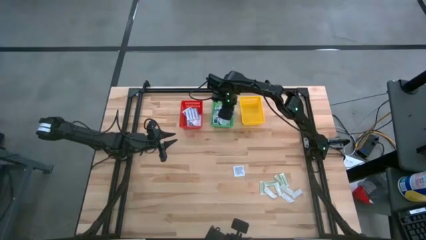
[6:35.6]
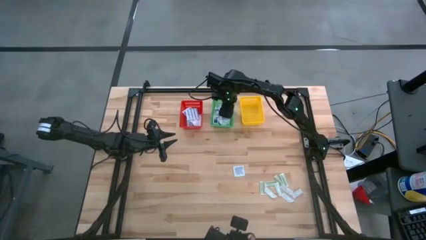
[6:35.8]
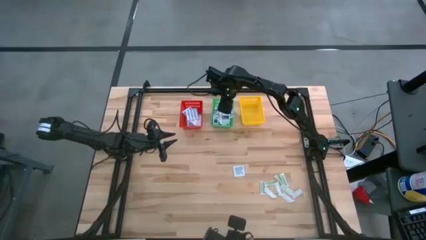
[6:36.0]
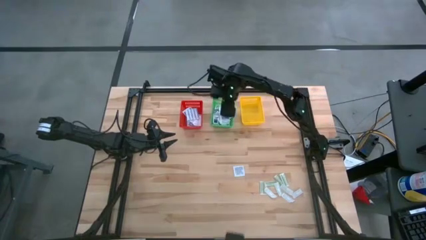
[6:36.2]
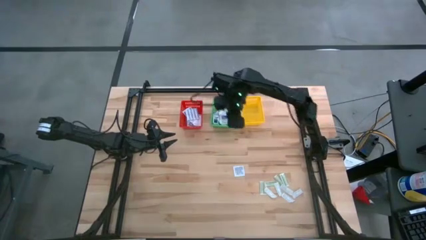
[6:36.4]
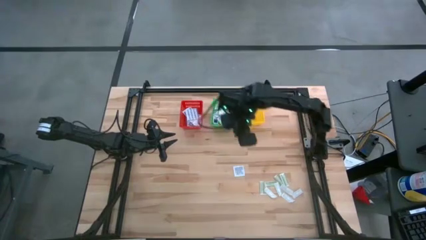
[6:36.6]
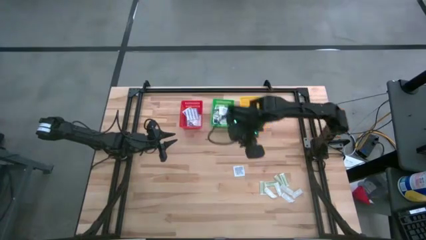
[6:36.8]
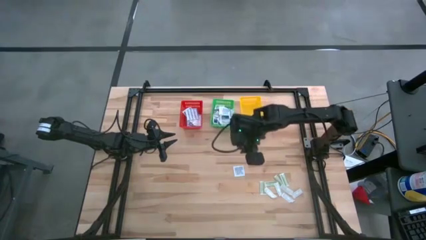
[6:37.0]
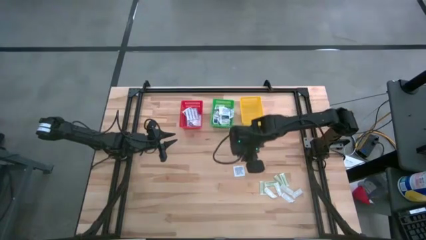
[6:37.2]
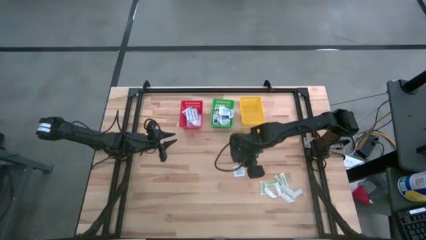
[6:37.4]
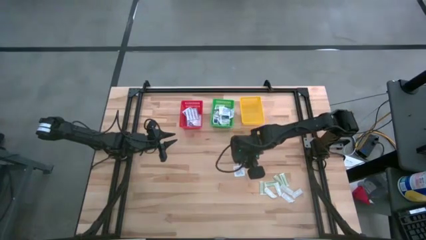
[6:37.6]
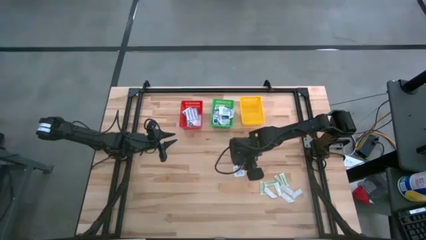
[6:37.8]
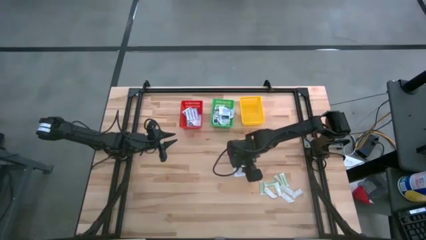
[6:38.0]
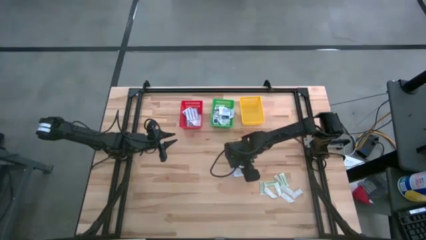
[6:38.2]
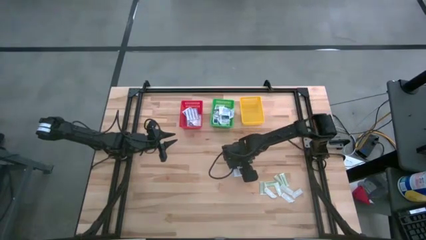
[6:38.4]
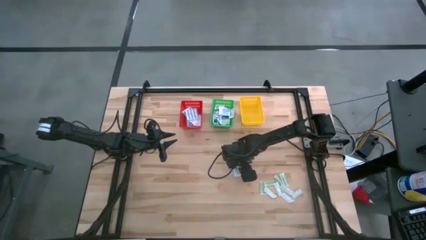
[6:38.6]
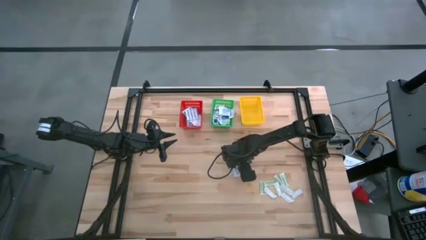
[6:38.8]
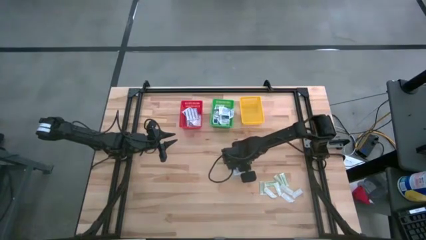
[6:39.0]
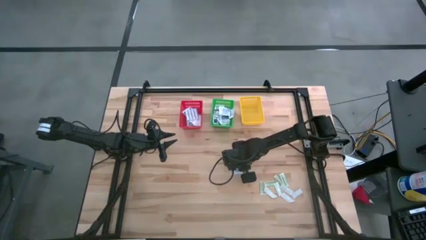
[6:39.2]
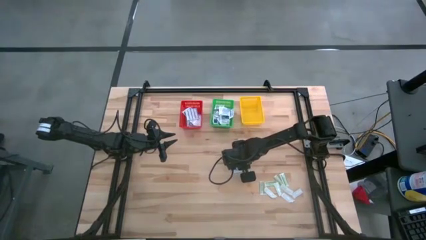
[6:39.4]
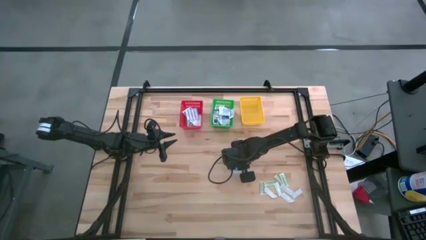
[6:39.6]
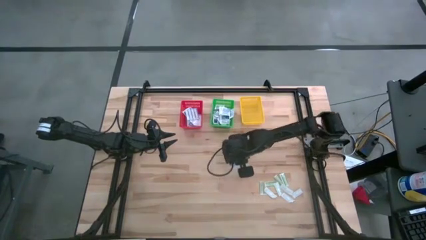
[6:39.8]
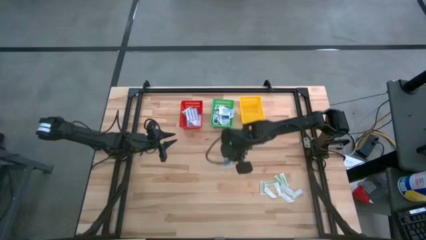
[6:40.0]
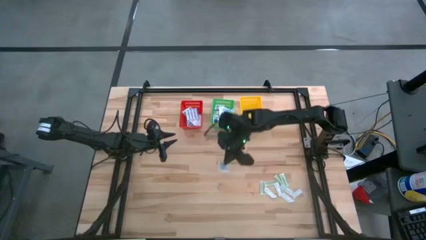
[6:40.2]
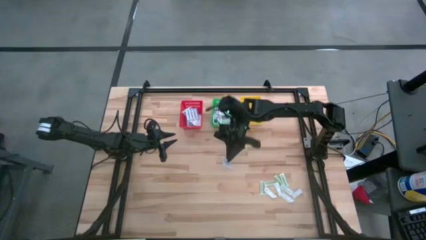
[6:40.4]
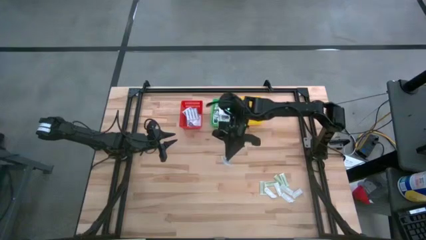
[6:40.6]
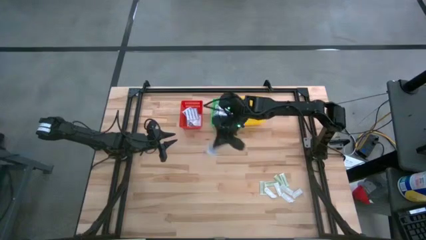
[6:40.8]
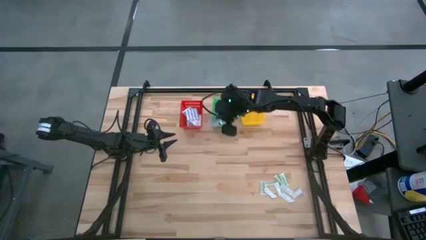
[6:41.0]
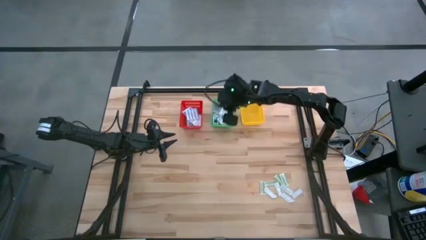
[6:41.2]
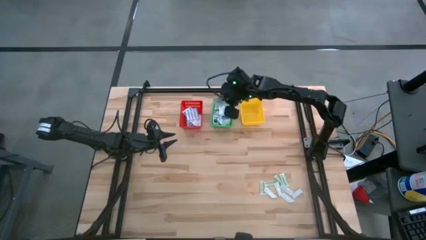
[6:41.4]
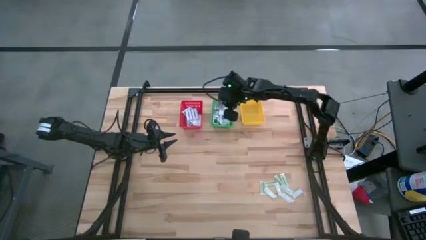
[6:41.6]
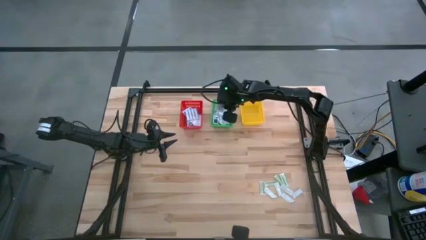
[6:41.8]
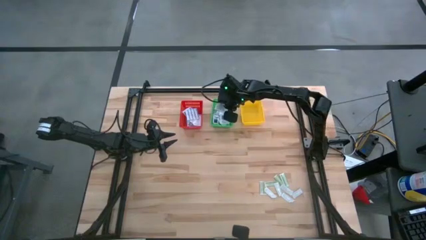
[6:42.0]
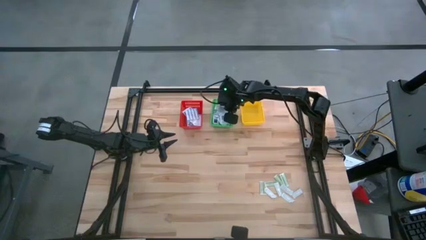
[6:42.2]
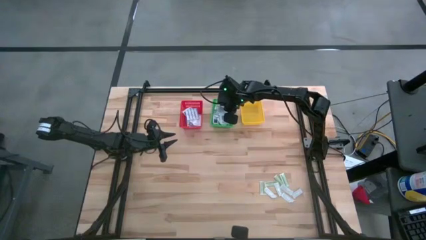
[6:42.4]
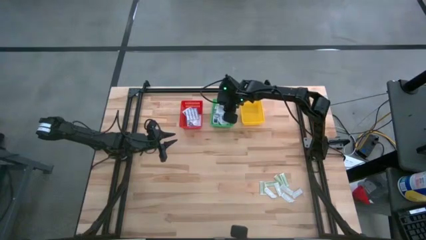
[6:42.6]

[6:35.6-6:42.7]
Task: Pick & Place First Aid Supplies
Put the alcohol pad into the green basket

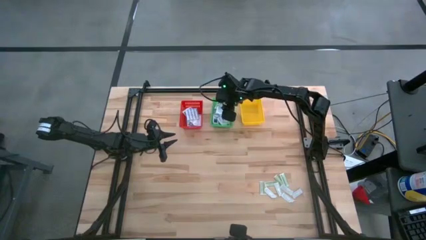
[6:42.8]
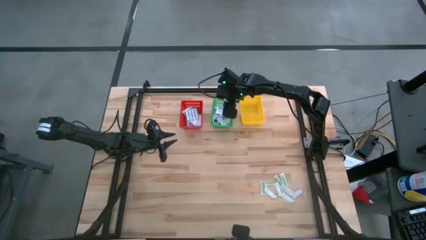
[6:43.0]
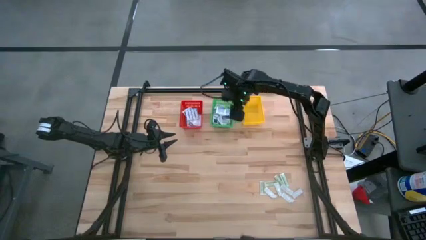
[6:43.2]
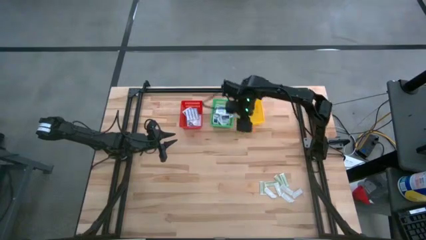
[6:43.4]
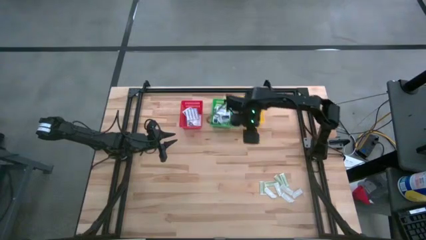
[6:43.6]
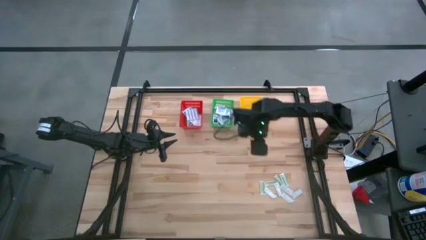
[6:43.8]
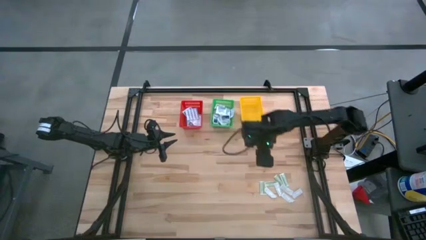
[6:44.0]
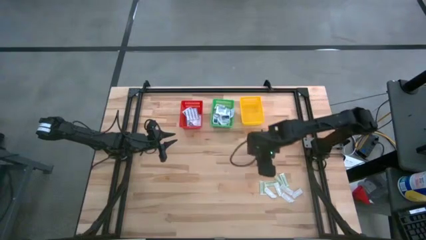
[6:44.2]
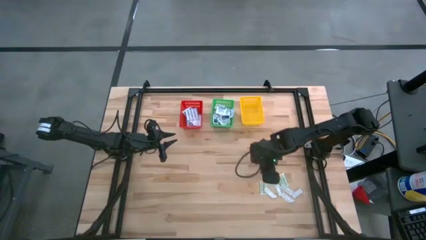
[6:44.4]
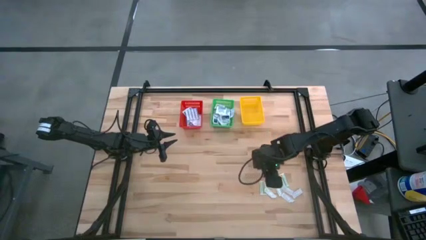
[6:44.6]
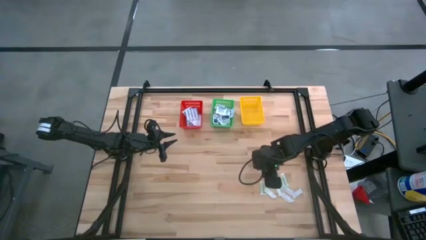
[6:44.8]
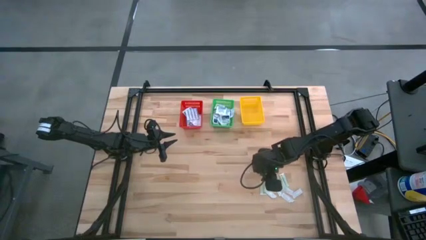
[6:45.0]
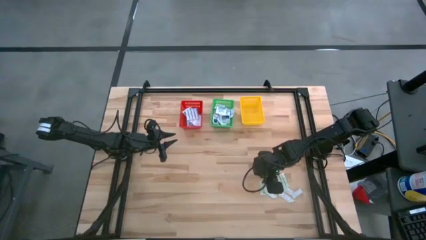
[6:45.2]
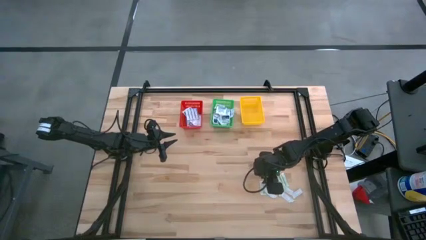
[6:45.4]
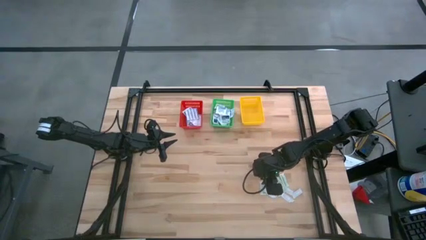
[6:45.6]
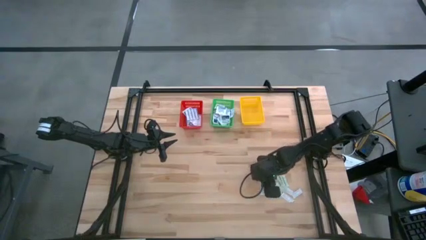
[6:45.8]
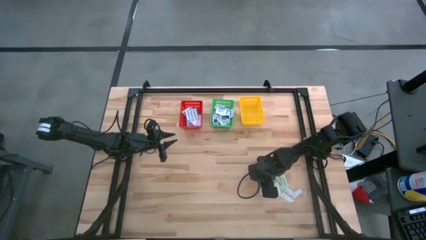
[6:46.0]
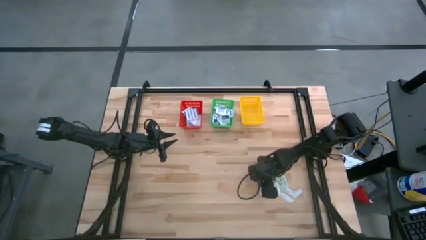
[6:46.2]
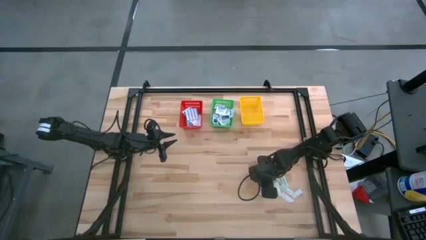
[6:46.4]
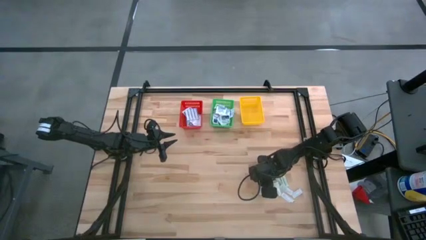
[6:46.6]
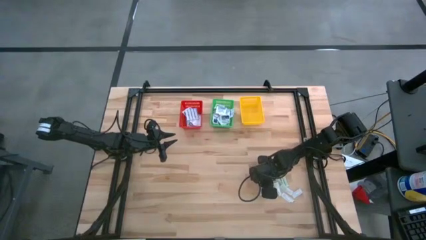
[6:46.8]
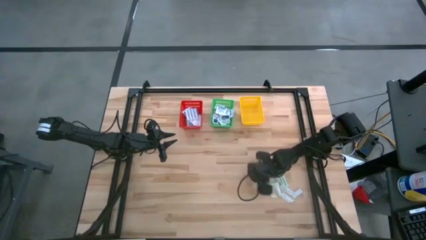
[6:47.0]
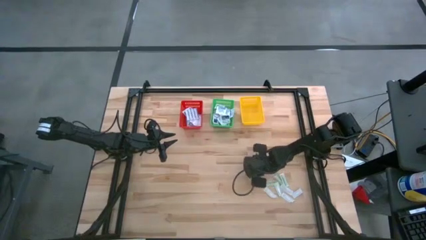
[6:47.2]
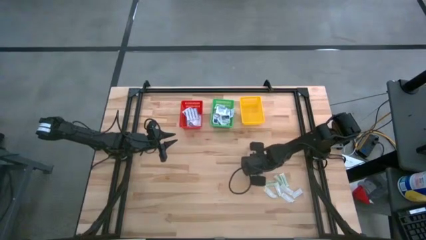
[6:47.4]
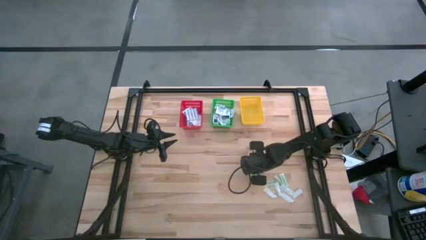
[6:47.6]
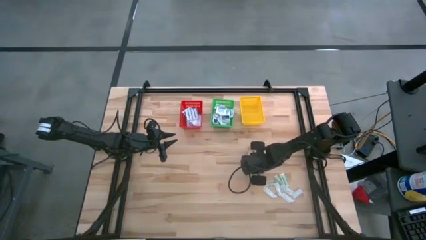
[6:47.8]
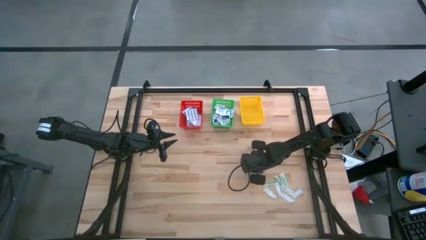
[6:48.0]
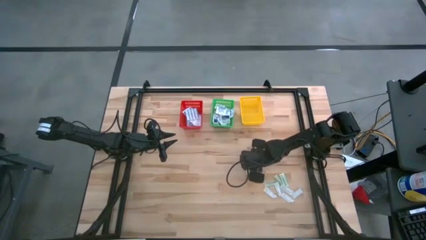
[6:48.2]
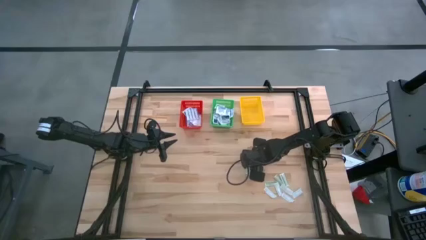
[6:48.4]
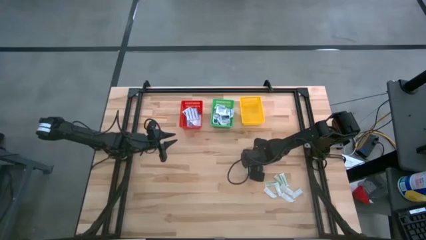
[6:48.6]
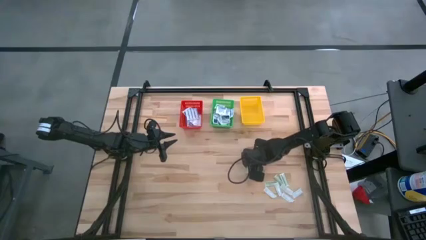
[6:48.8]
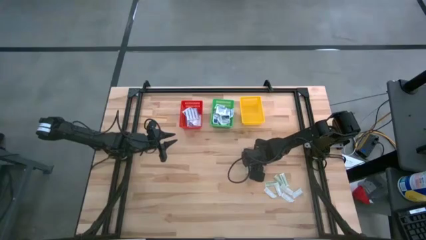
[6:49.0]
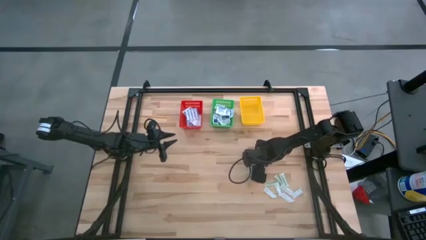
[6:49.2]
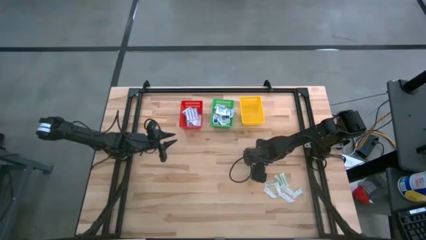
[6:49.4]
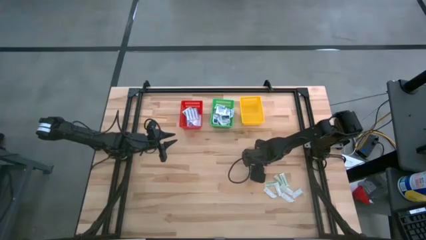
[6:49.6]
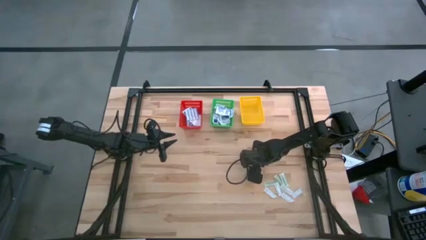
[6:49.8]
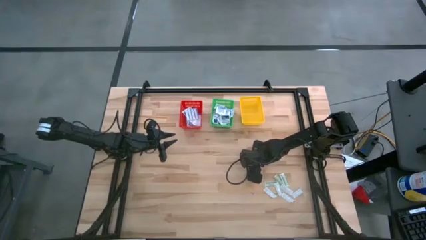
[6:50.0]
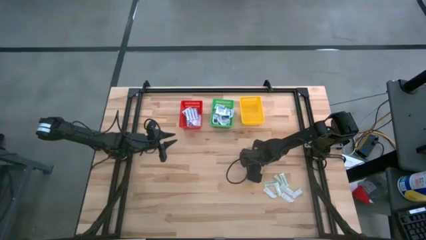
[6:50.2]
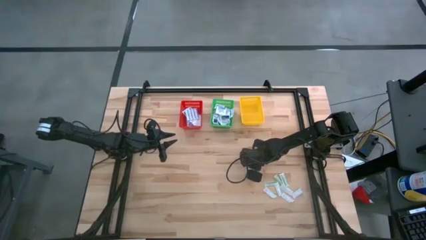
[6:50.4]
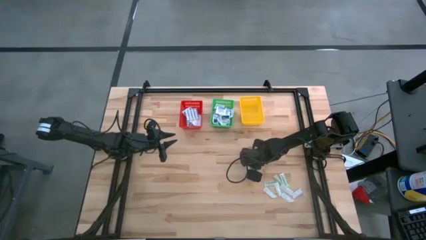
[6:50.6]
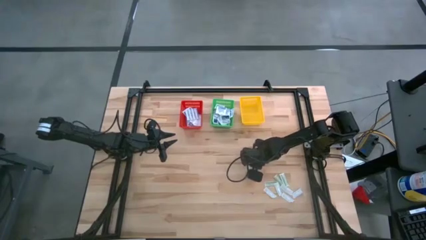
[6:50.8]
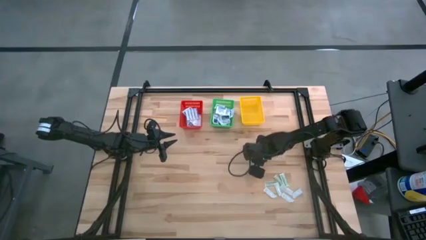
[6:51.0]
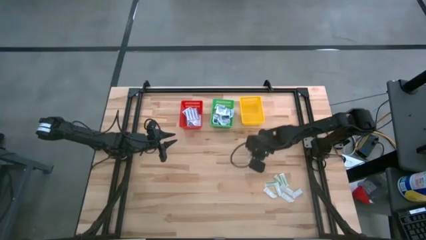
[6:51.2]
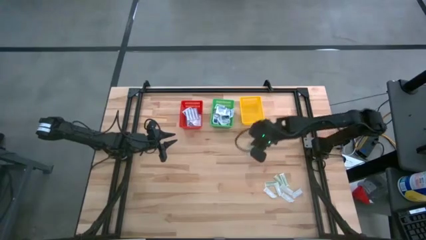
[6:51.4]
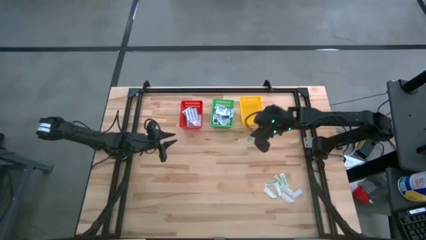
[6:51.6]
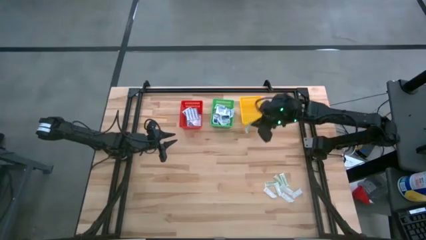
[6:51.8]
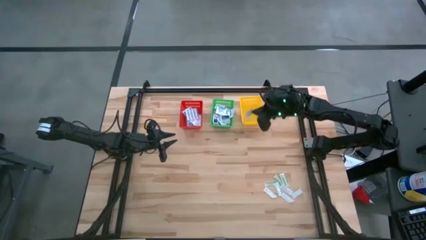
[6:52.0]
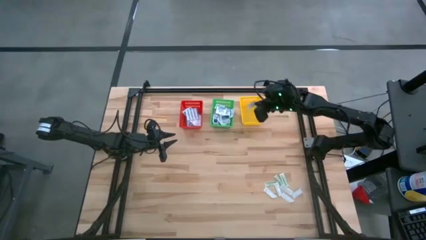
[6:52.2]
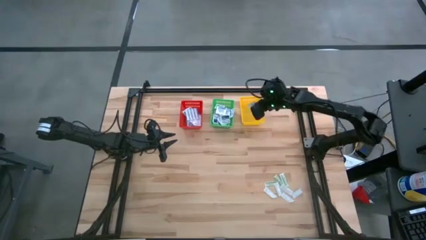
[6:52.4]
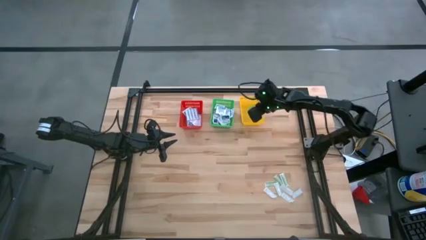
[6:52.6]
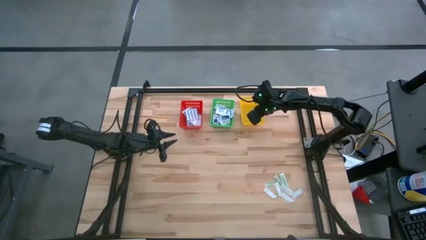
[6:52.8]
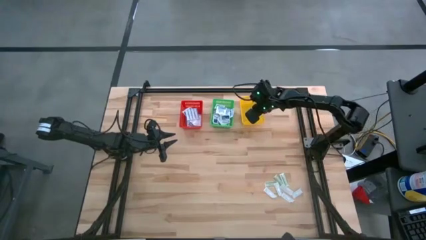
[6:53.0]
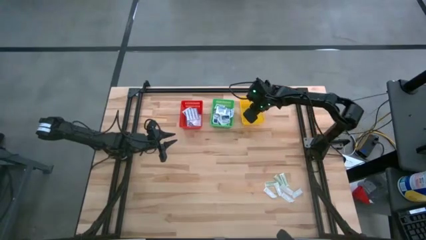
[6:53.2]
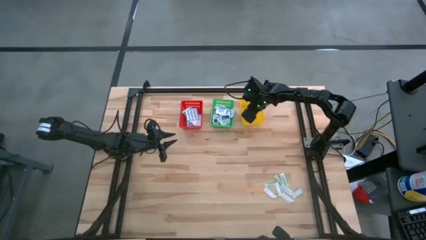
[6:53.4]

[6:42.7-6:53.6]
Put the green bandage into the yellow basket
